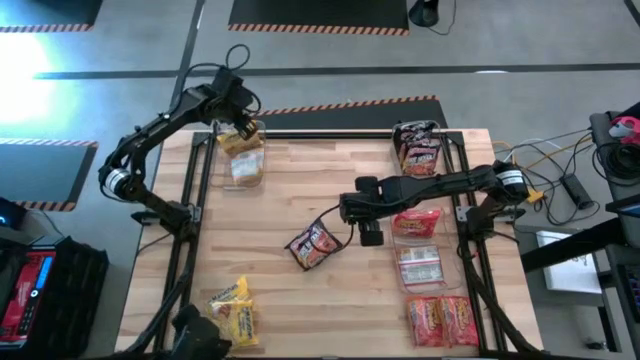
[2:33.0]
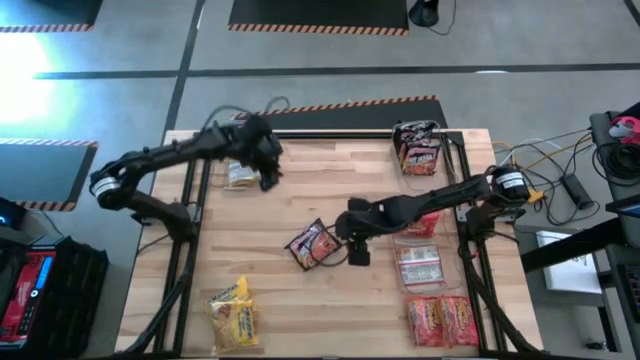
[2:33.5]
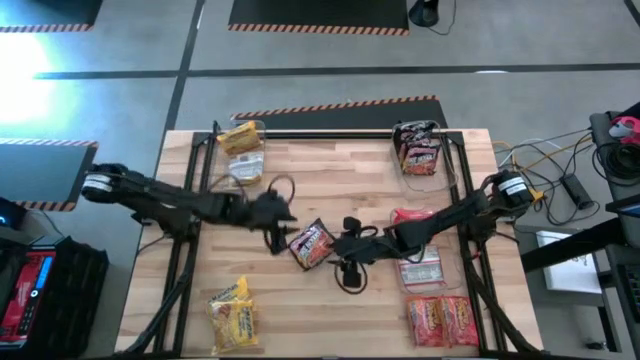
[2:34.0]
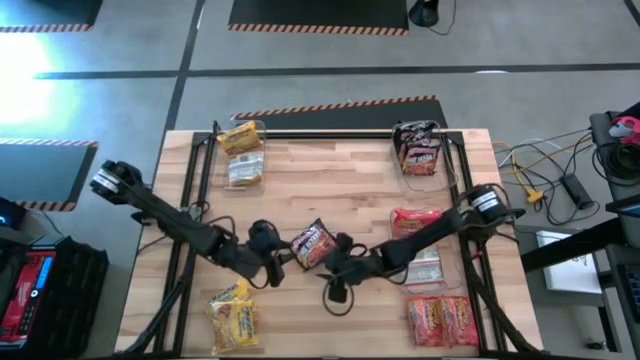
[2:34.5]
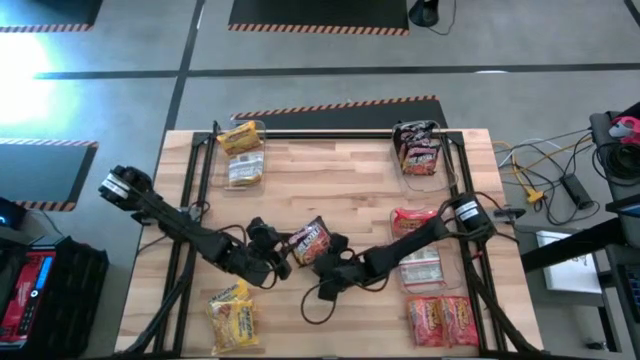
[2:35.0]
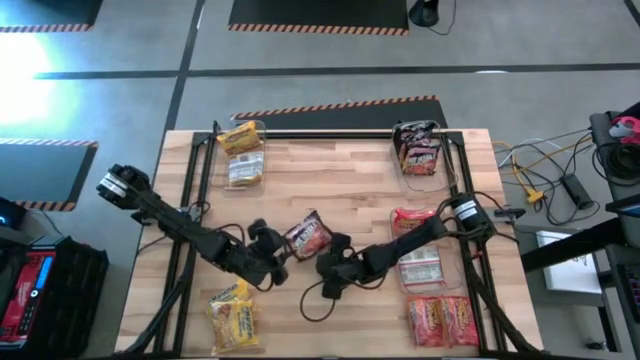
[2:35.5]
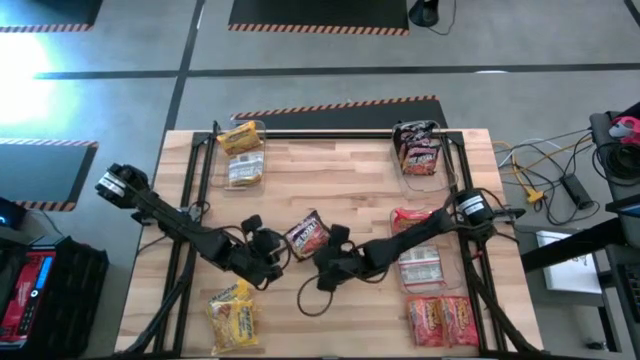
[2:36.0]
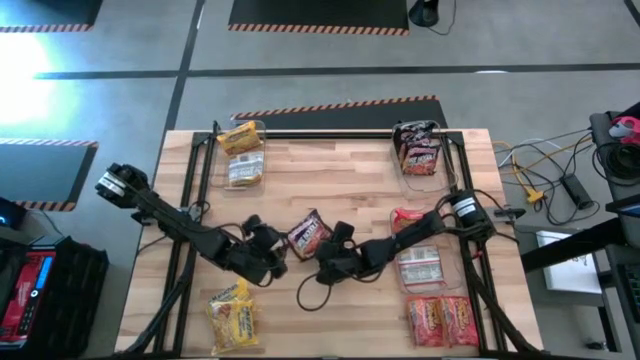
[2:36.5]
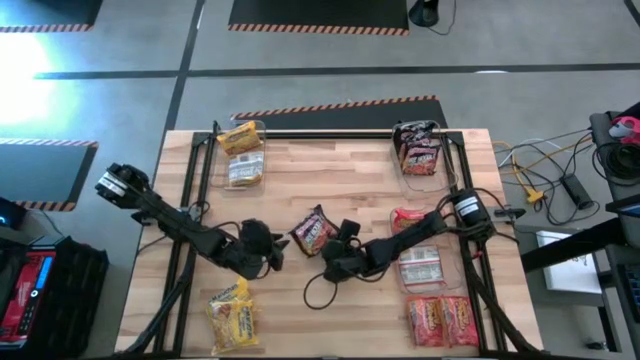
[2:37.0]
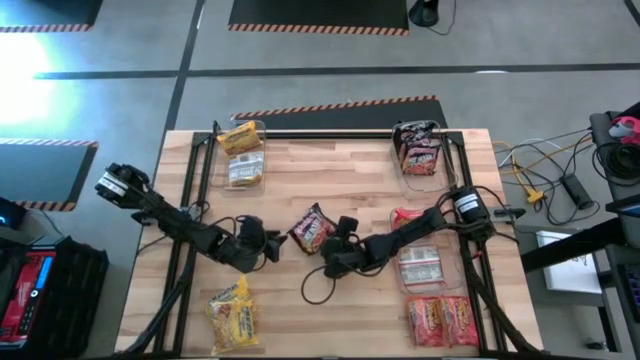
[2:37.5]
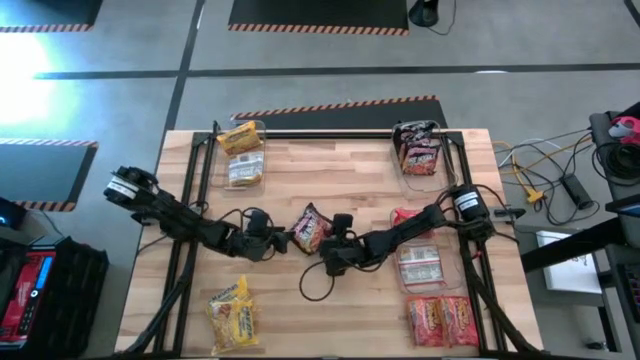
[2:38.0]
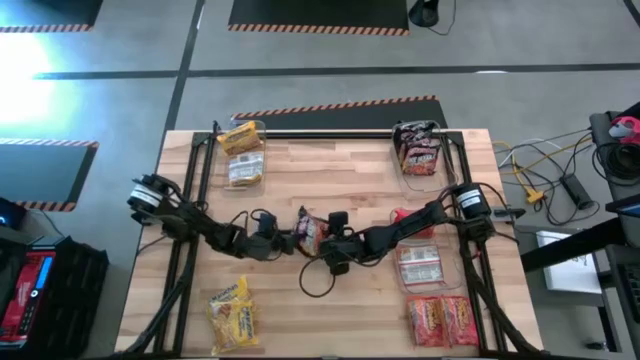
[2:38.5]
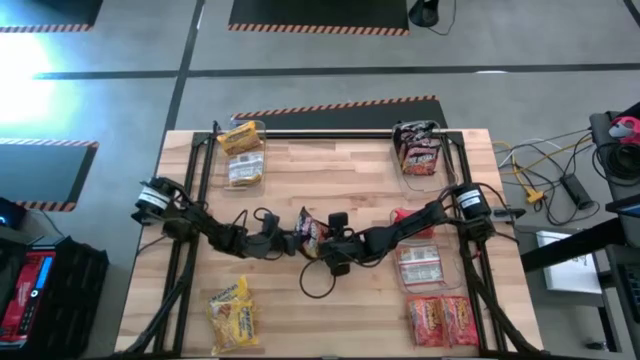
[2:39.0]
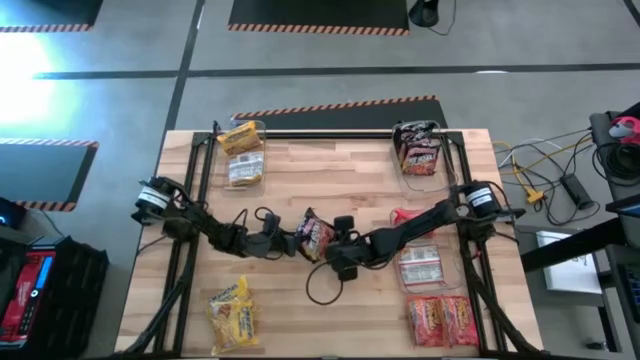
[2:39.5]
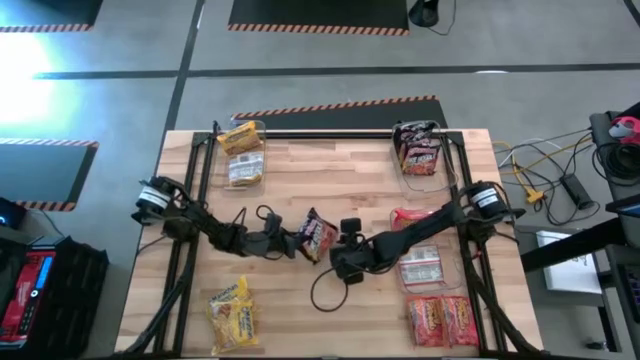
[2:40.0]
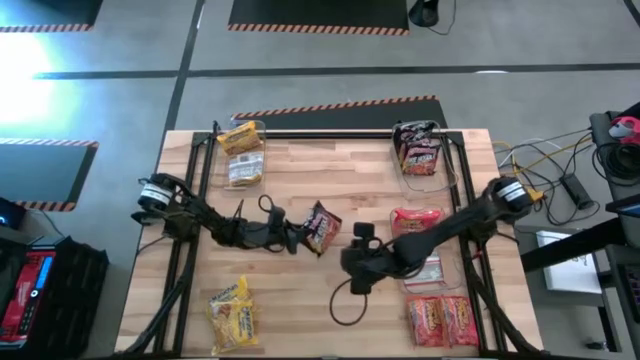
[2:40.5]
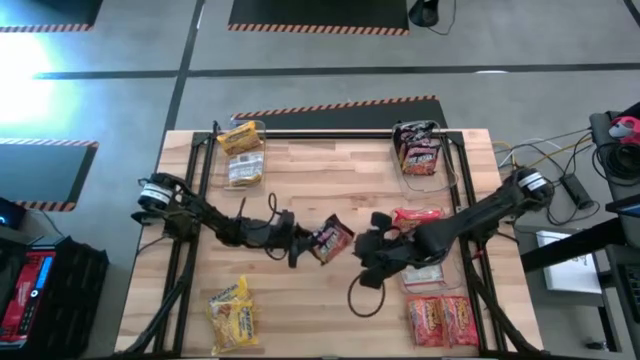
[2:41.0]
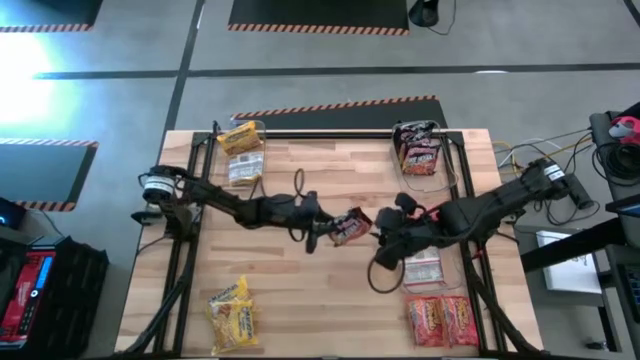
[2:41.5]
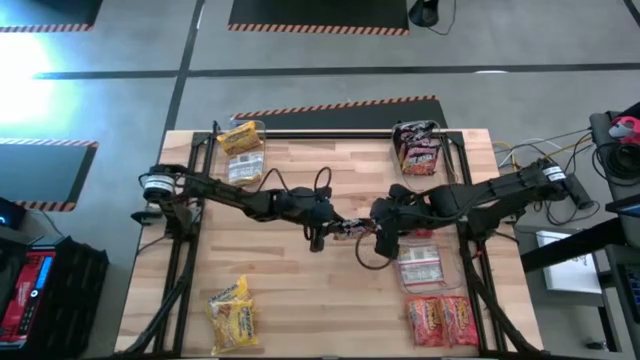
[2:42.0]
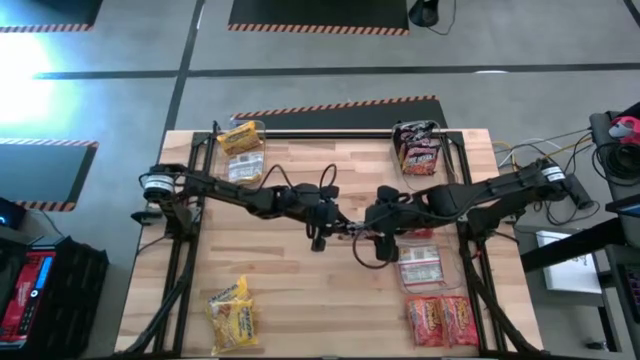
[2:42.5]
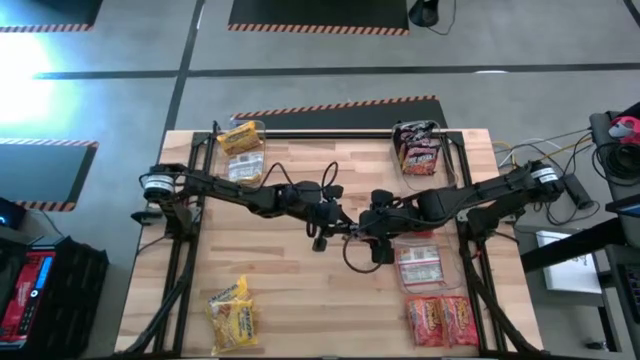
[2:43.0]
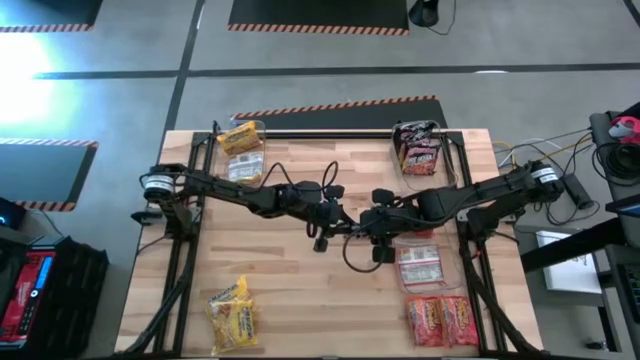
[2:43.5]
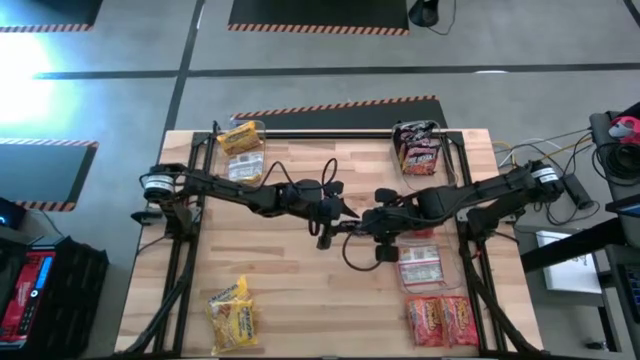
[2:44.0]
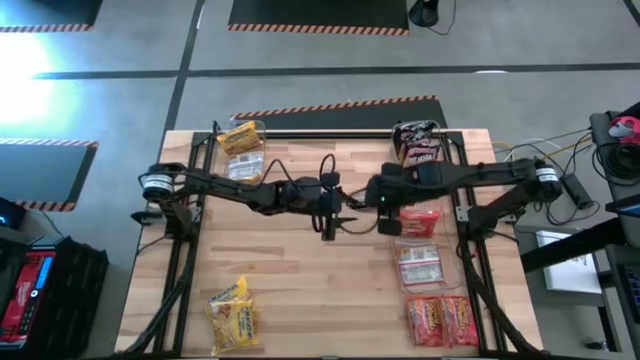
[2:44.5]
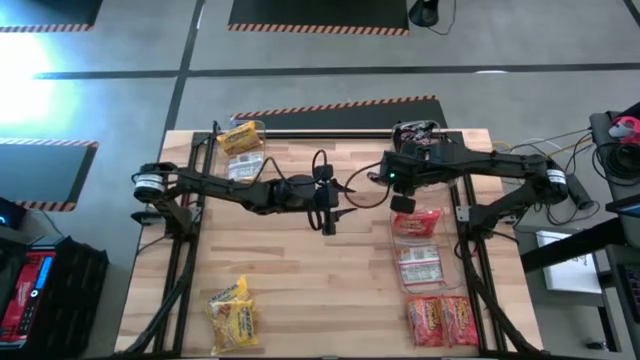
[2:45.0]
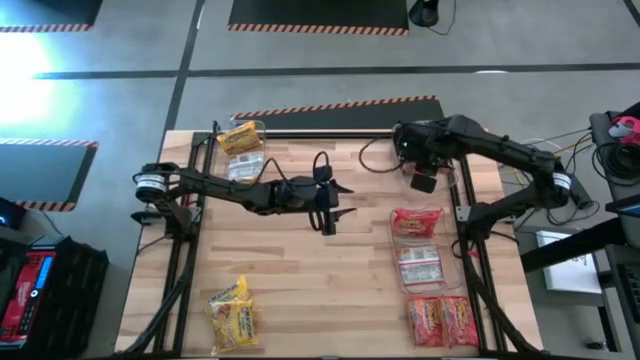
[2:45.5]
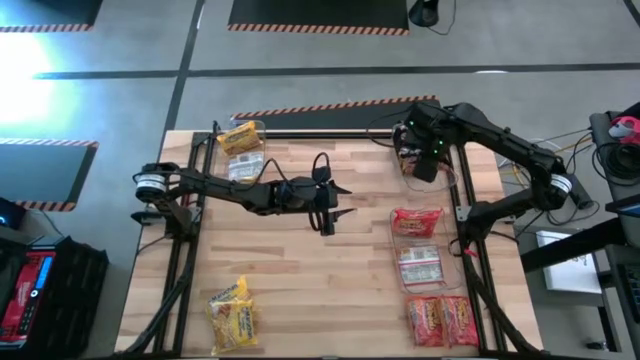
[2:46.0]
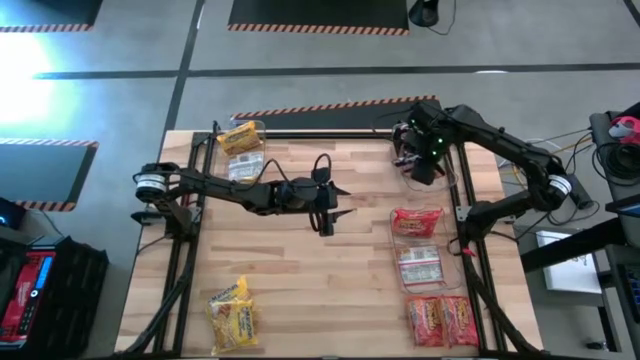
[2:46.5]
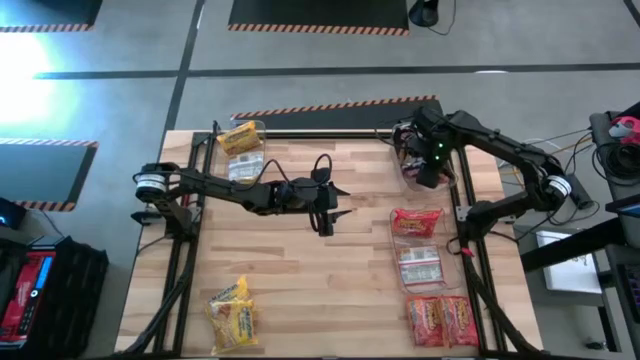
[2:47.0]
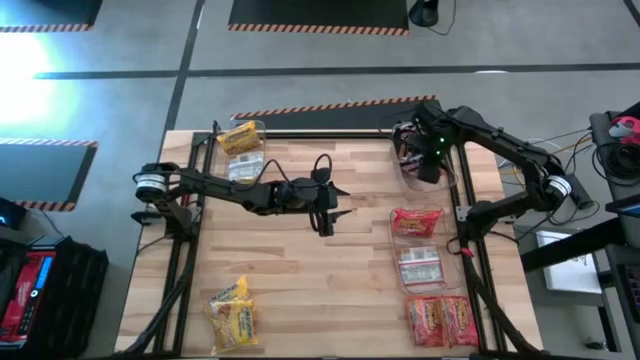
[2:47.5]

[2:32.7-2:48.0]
Task: Sort Maruchan noodles
Put the black noodle pack into the top right transparent bin

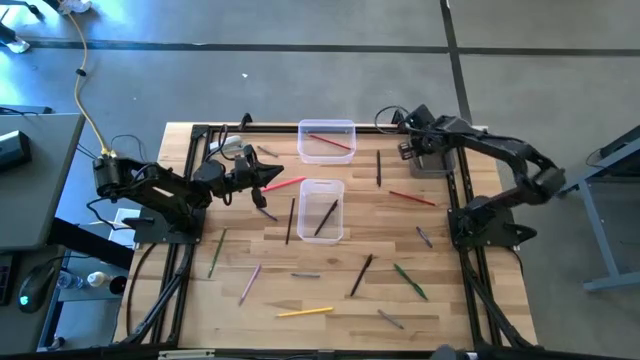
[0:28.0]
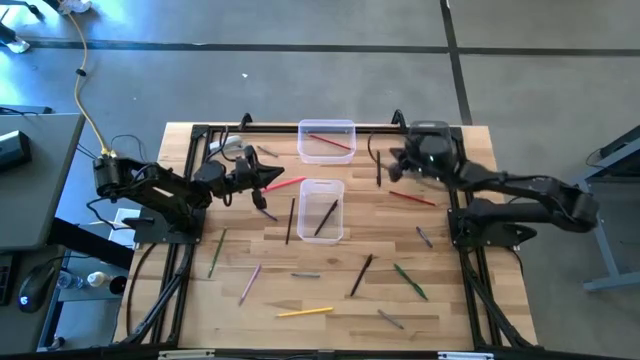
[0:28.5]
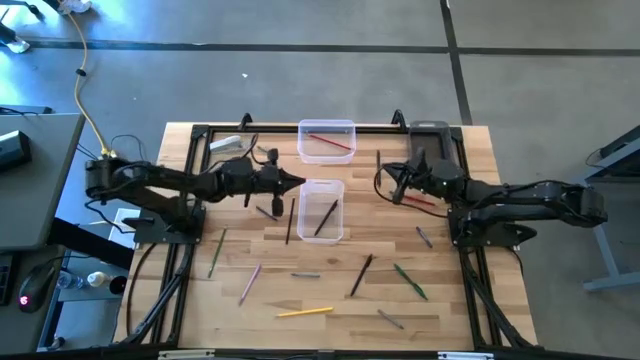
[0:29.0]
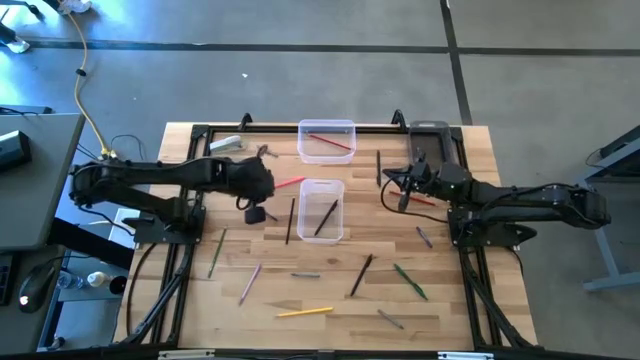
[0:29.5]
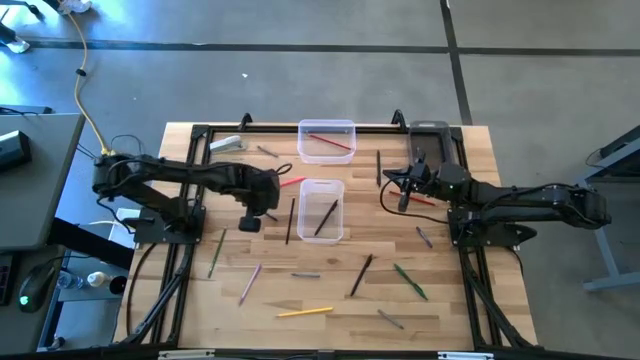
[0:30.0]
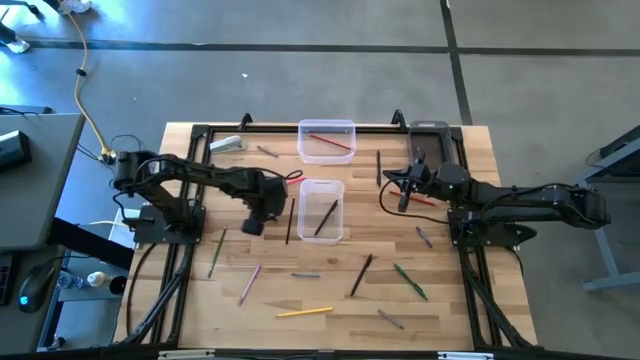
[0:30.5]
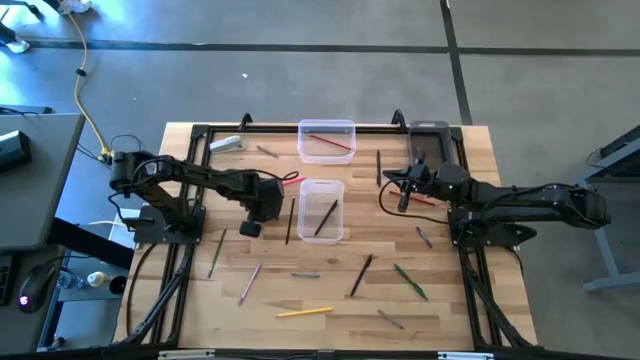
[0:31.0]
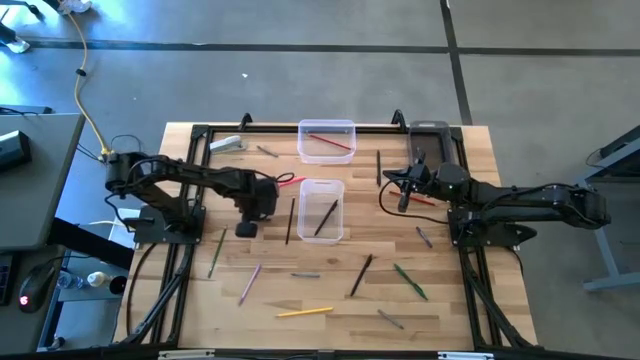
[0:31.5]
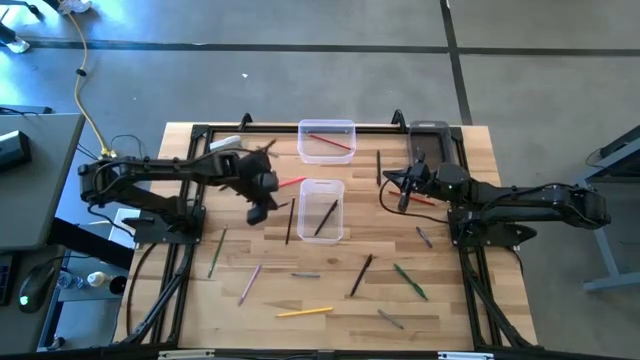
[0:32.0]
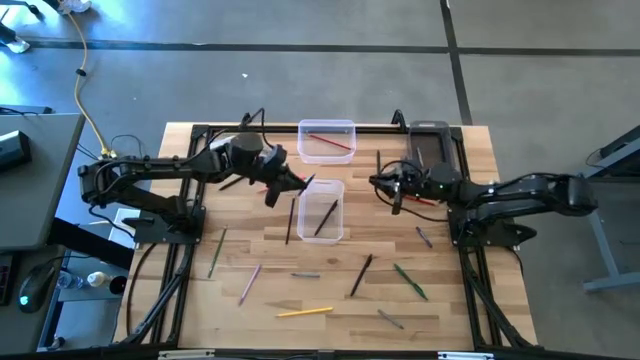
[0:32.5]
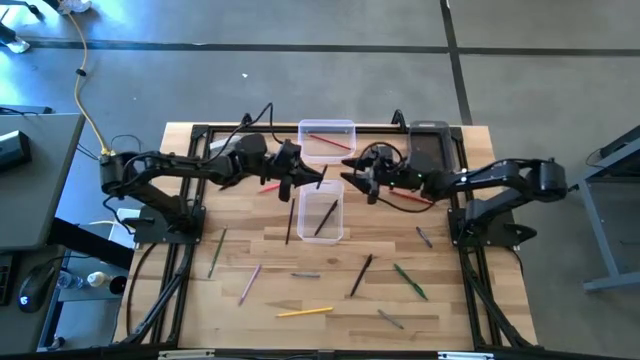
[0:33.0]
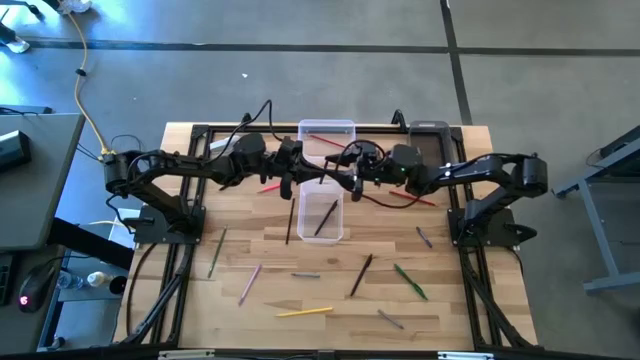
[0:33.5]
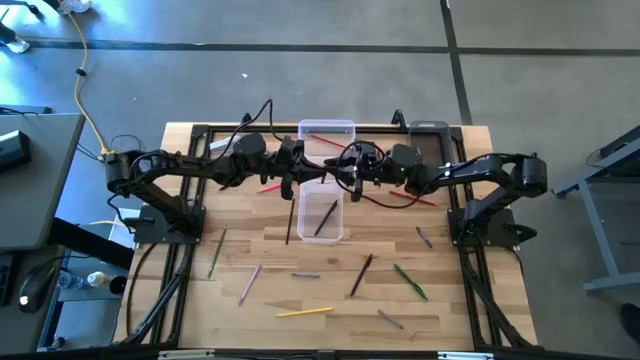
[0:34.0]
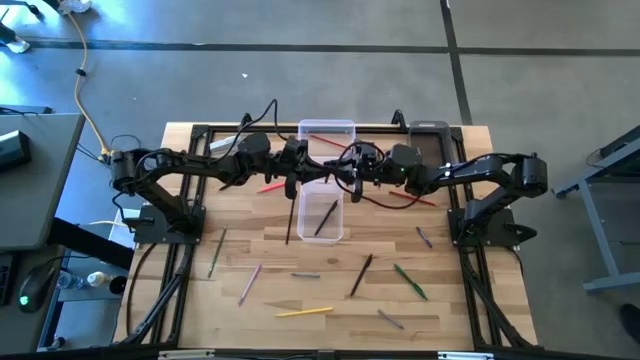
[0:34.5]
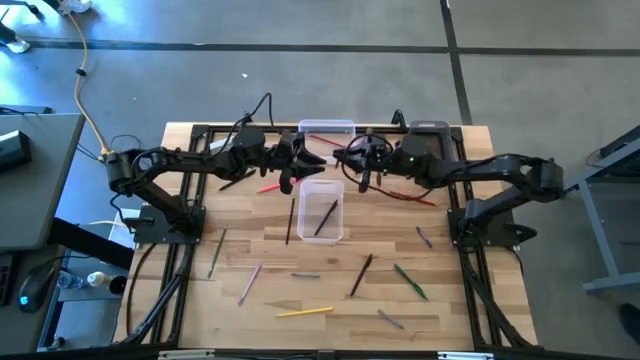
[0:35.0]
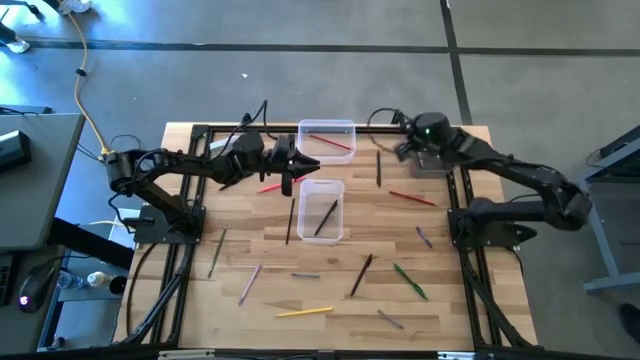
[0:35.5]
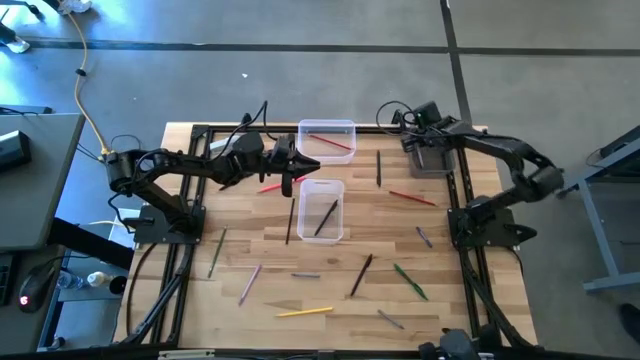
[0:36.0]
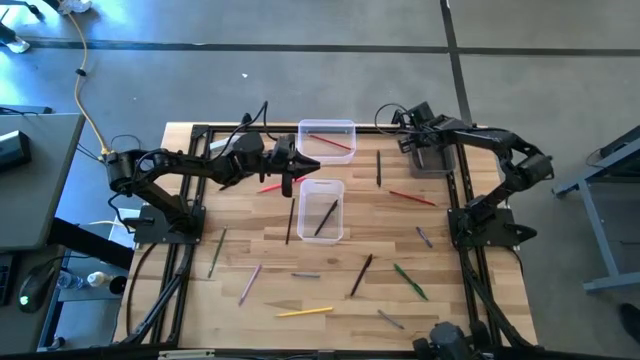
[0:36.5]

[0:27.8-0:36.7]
Task: Sort crayons/erasers/pens/pencils in bins
Put the left blue crayon into the transparent black bin
